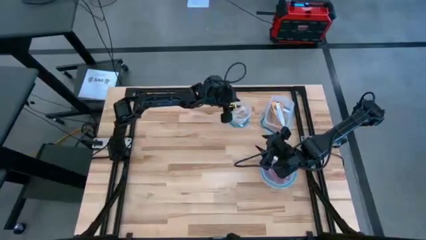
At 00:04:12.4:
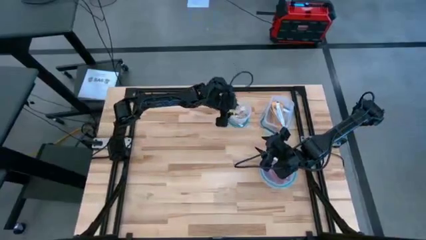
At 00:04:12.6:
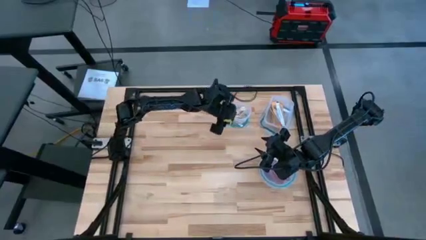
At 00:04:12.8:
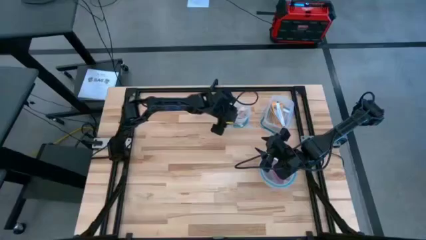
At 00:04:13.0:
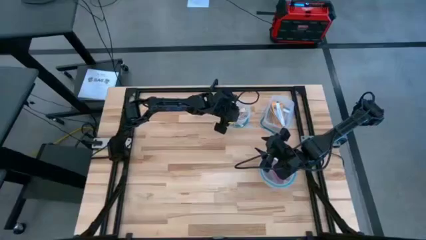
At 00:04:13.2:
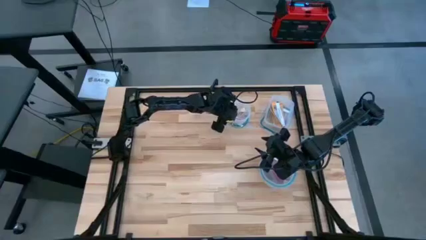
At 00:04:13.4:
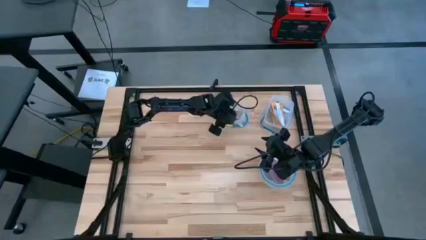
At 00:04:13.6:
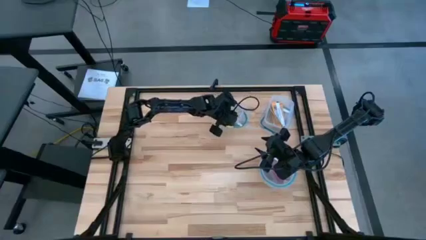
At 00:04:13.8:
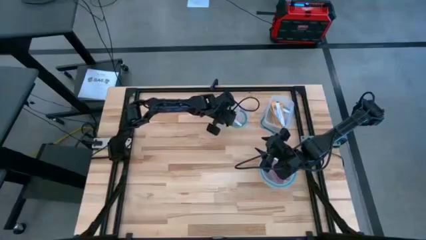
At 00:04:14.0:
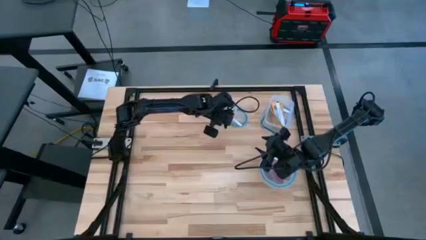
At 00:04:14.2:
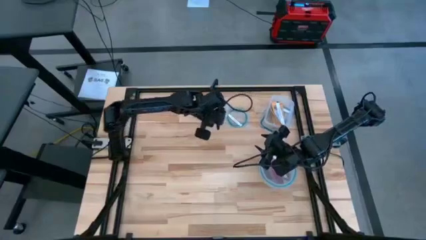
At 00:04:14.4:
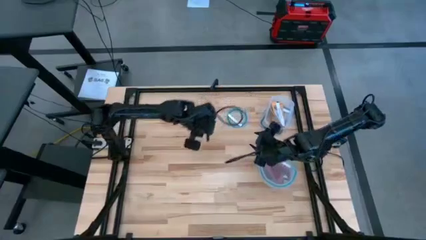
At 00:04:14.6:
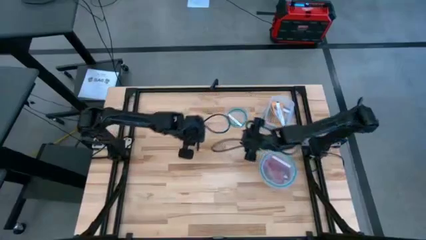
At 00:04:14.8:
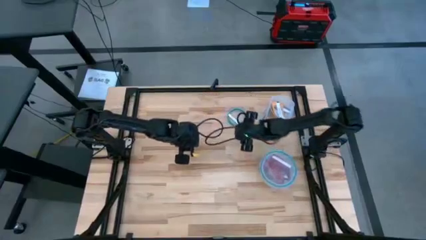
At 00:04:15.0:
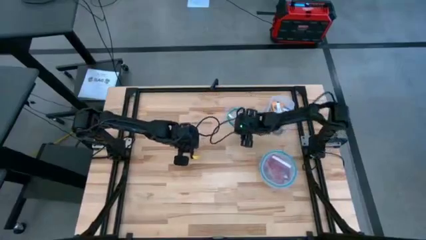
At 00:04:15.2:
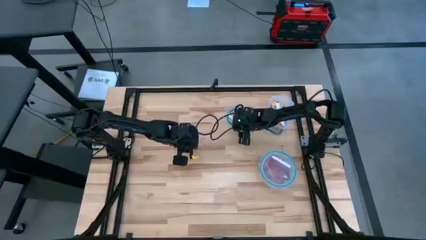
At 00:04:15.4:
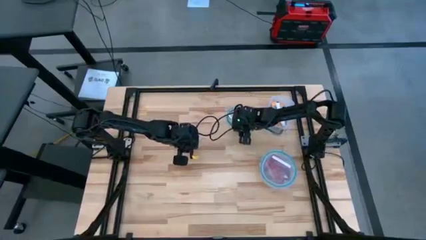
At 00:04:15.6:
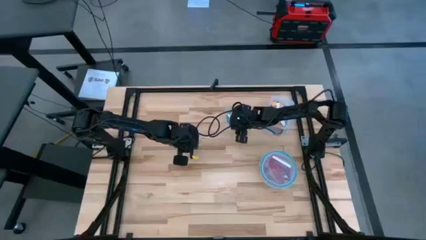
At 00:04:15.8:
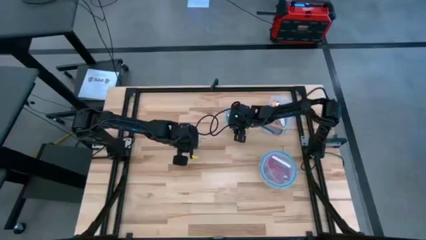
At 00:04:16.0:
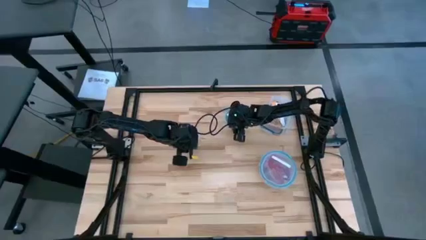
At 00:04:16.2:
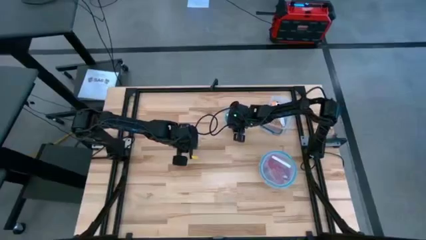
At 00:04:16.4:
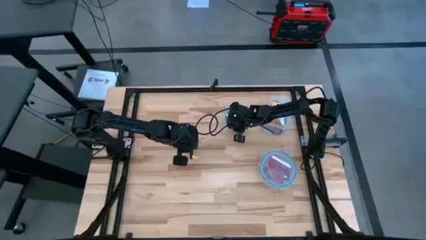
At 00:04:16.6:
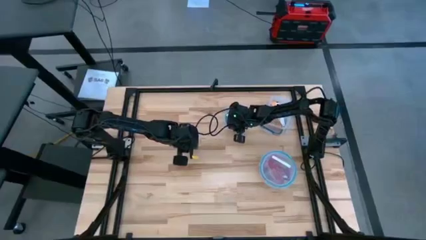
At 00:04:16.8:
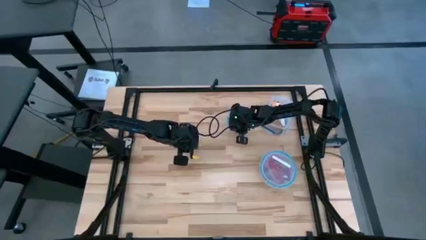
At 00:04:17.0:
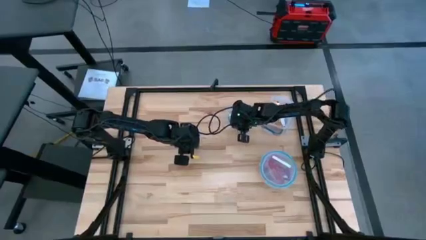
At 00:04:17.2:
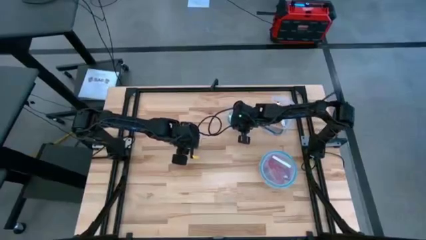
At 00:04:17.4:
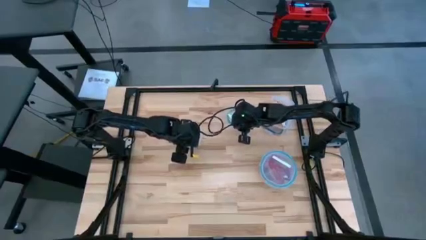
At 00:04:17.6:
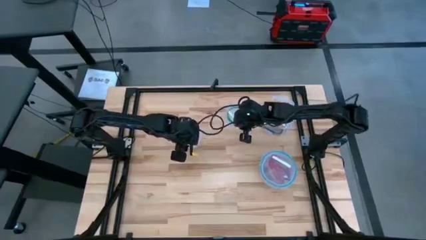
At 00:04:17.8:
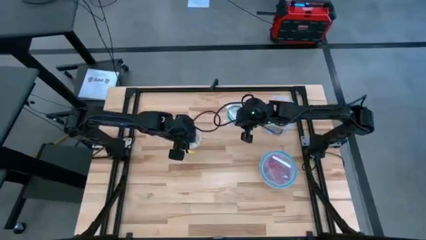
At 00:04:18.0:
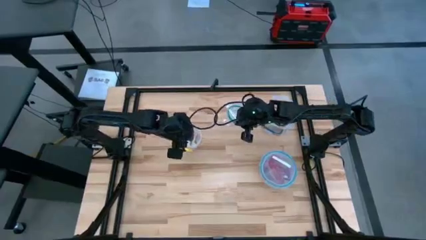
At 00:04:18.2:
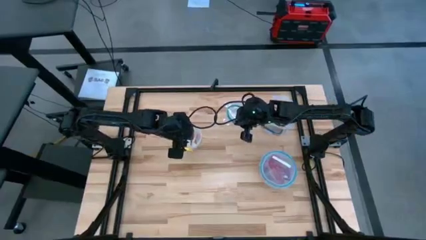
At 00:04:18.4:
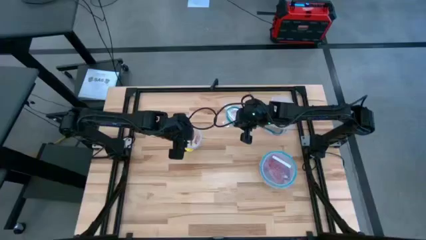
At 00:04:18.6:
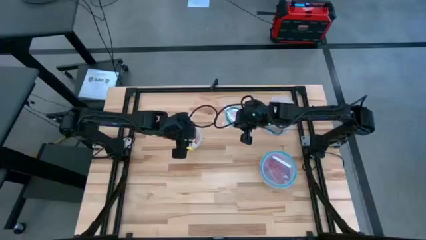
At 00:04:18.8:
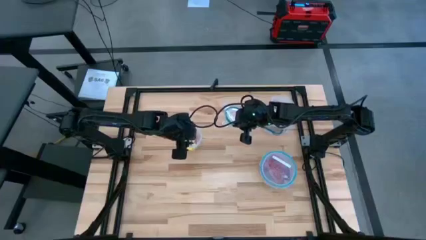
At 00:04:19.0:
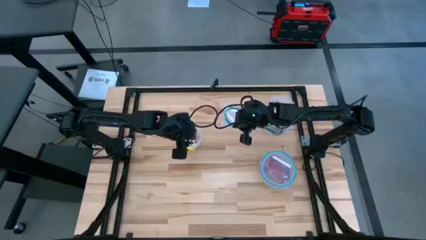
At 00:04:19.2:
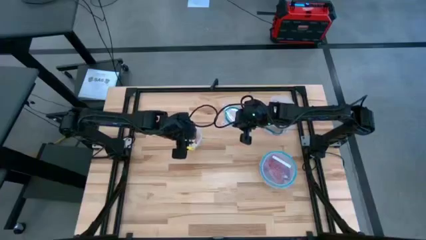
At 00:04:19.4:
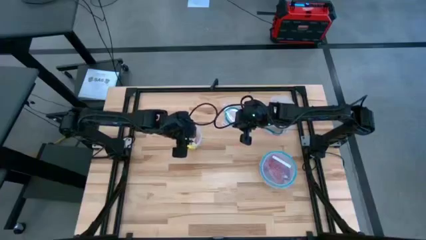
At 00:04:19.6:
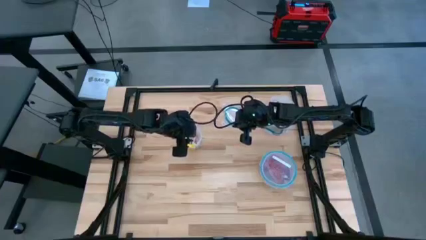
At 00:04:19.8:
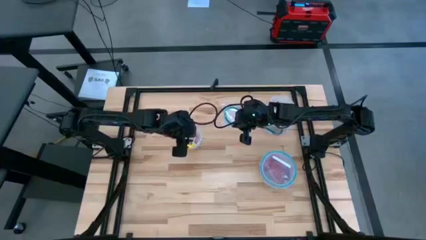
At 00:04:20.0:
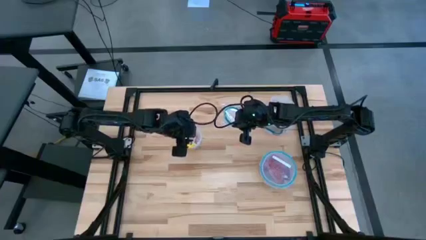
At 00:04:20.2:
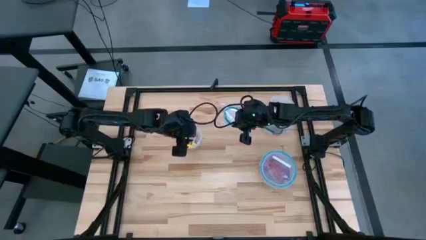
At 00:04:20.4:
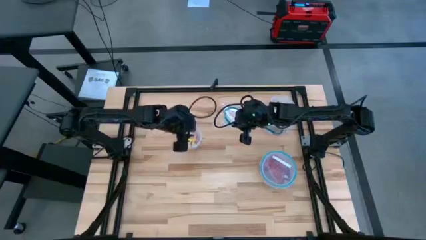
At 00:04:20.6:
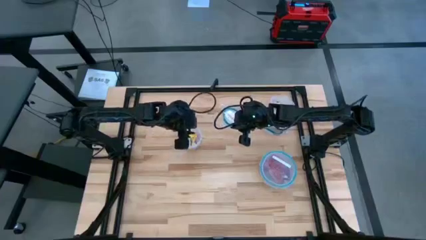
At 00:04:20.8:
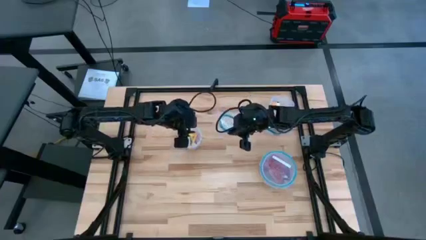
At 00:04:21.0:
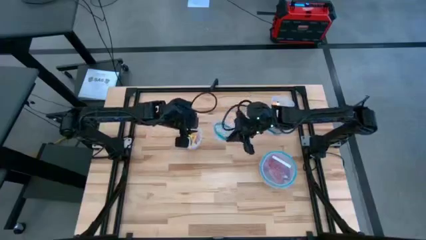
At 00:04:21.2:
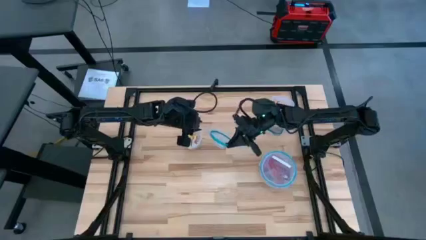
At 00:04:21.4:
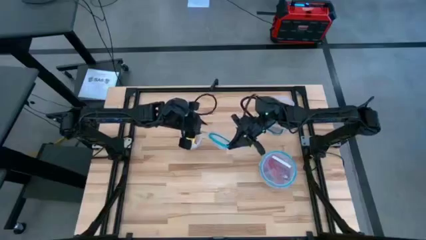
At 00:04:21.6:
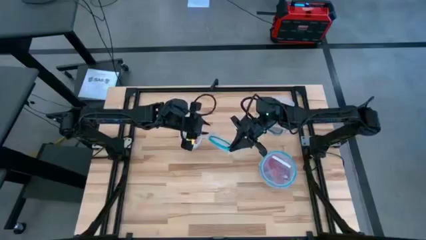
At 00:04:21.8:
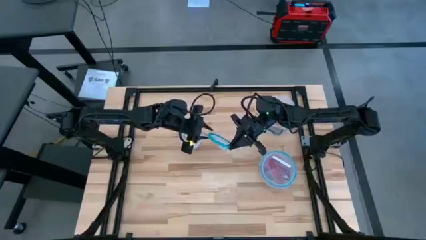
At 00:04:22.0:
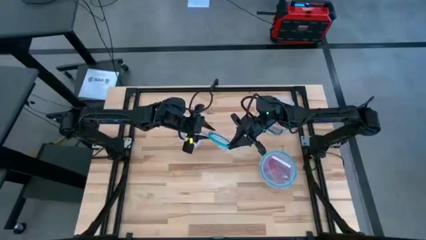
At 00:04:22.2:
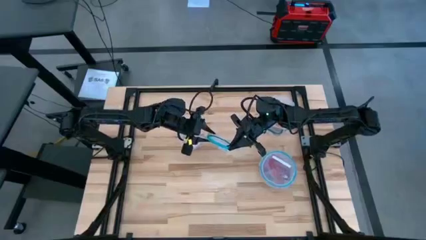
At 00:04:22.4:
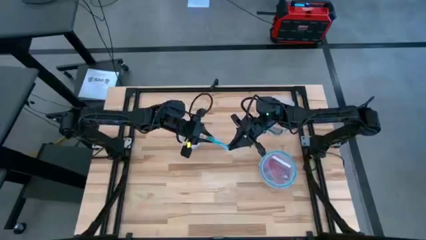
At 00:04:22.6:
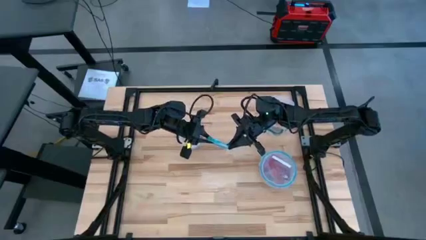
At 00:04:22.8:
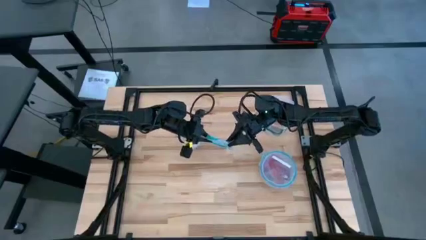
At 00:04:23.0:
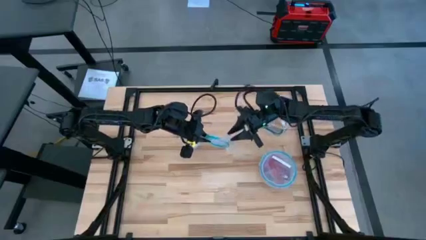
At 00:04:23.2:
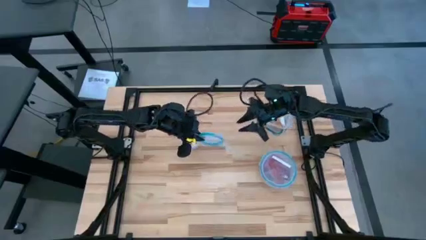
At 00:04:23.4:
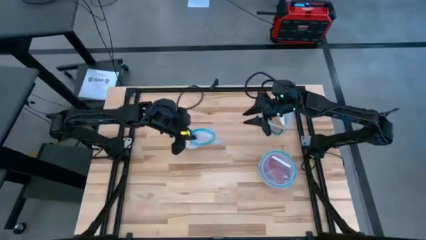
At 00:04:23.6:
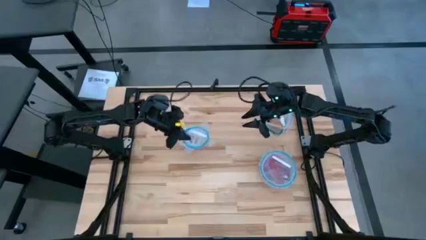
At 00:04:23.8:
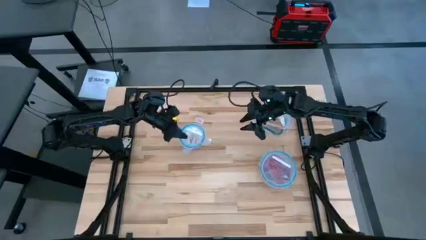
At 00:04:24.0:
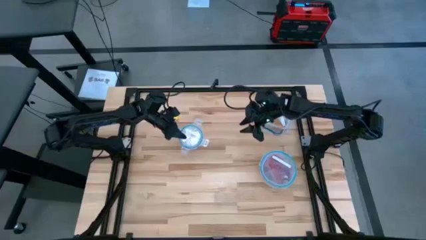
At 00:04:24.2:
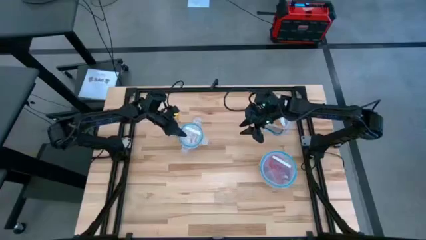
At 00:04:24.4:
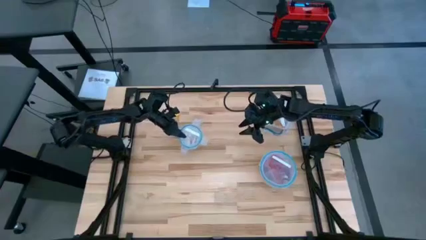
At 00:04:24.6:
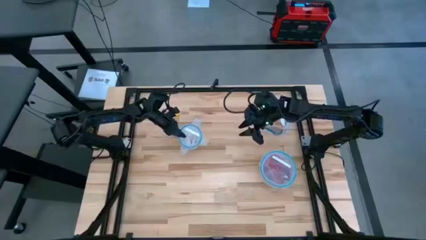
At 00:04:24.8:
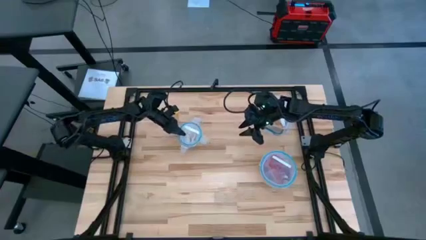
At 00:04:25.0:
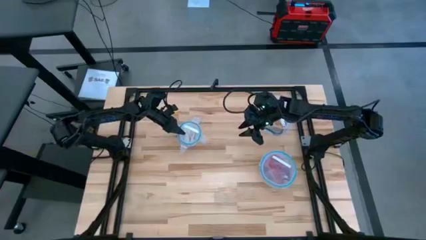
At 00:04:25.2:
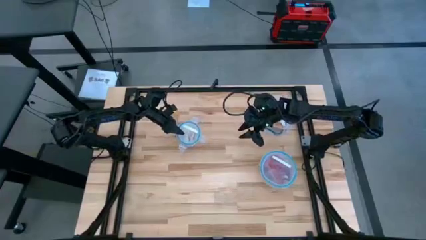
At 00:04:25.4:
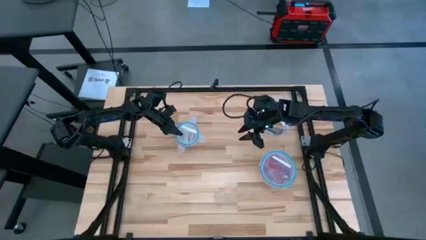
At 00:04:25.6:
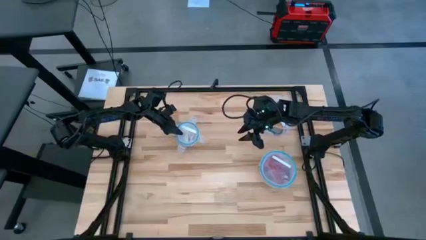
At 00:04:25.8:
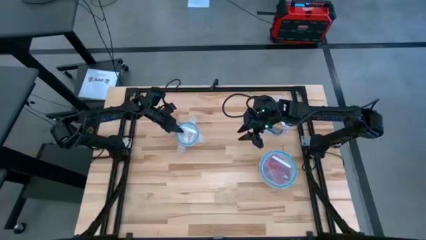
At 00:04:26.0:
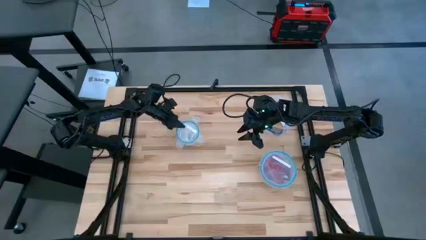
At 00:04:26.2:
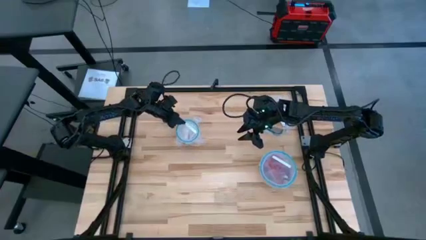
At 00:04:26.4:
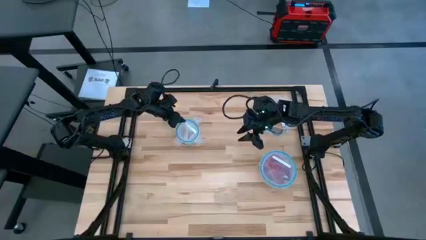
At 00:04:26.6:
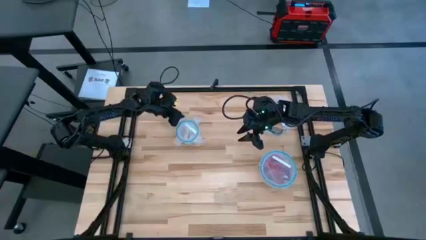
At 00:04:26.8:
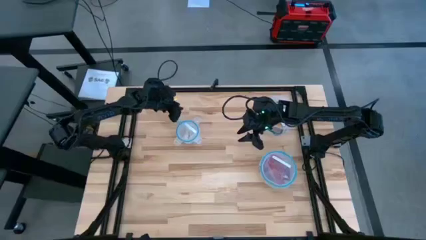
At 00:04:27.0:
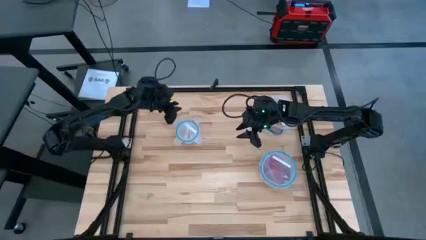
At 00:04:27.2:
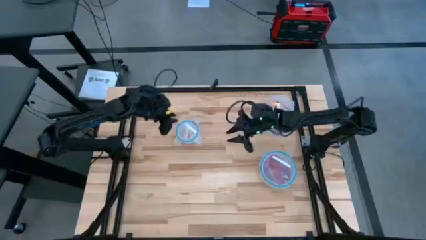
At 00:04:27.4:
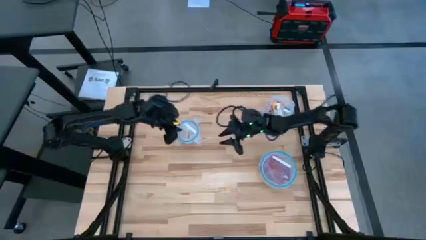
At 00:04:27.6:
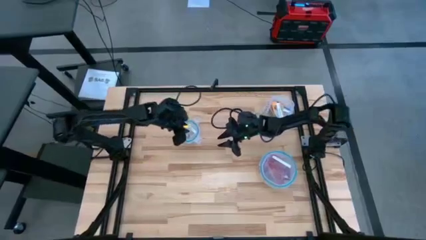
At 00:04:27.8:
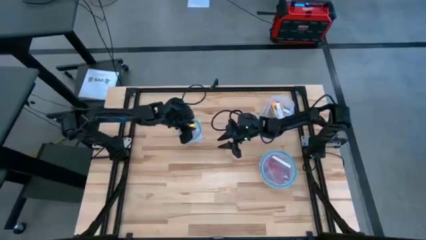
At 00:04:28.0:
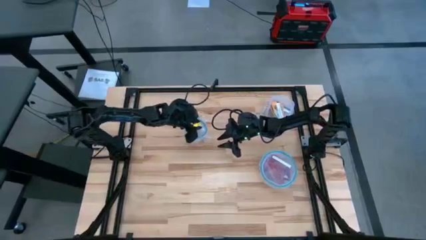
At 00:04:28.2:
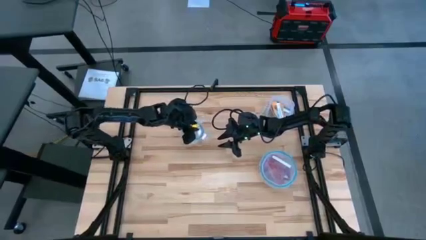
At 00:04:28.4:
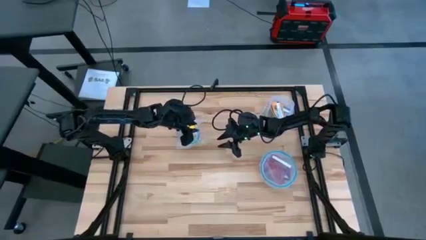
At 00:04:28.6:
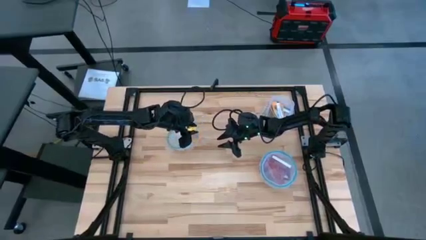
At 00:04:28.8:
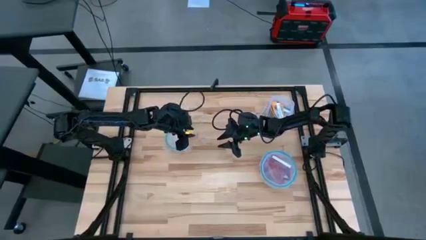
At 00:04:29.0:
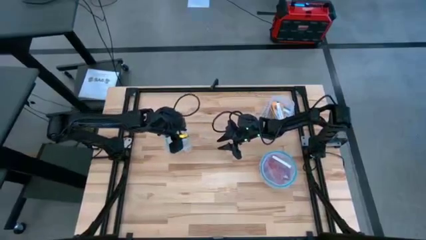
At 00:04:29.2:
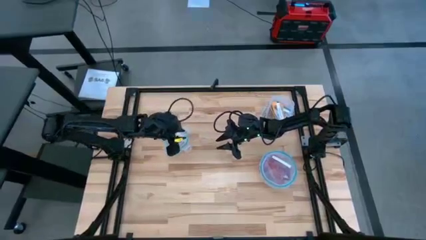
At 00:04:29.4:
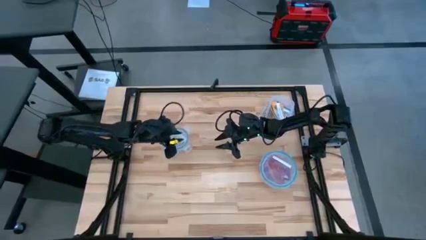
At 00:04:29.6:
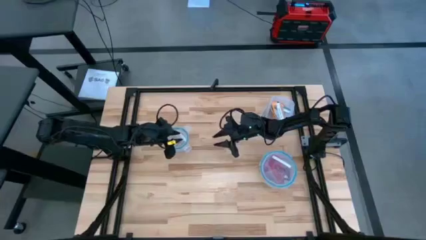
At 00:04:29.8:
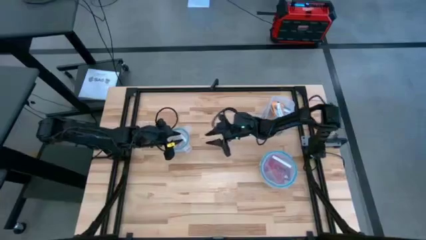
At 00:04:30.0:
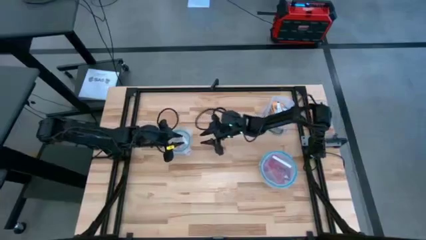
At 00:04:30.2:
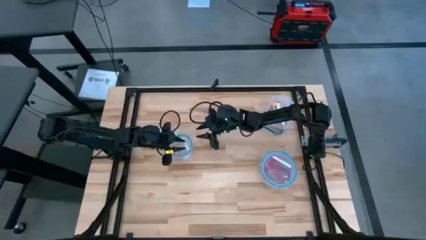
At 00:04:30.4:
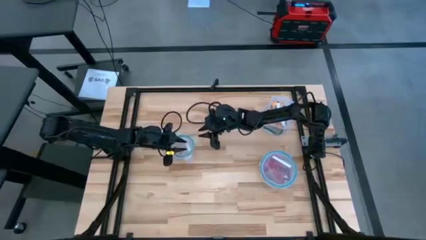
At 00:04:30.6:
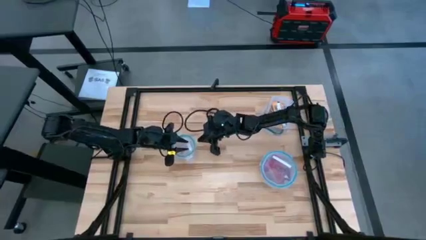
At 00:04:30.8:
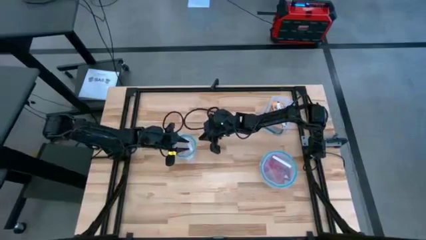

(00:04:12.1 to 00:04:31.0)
Task: Sort candy
Close the small round transparent bin
